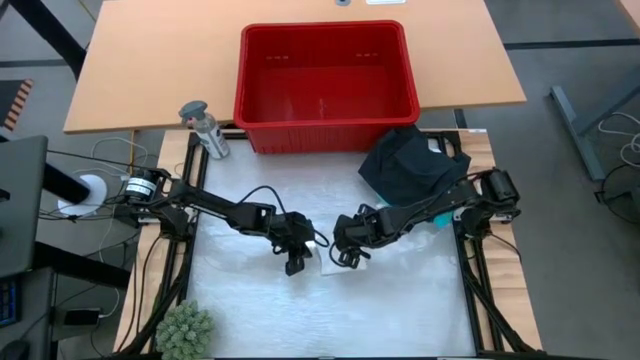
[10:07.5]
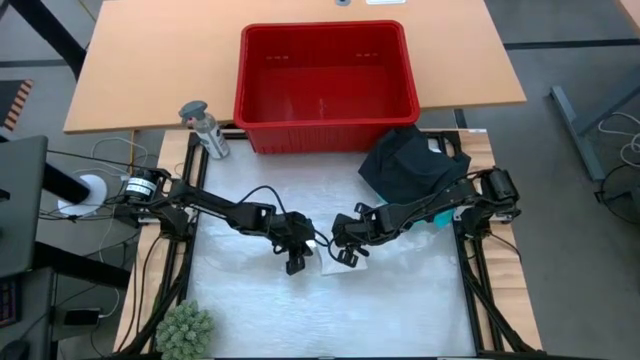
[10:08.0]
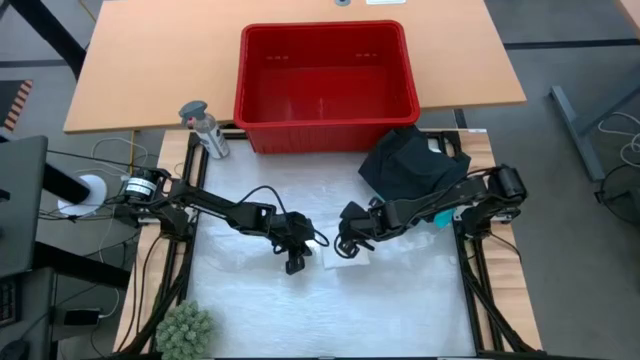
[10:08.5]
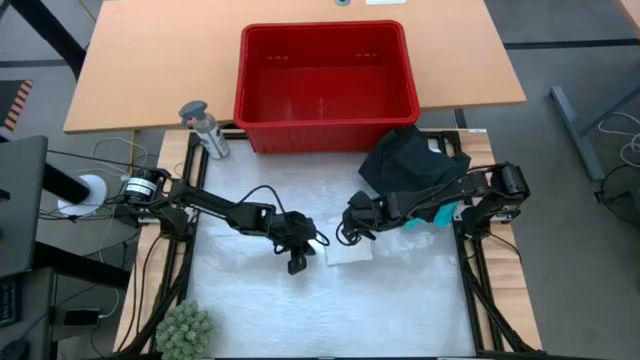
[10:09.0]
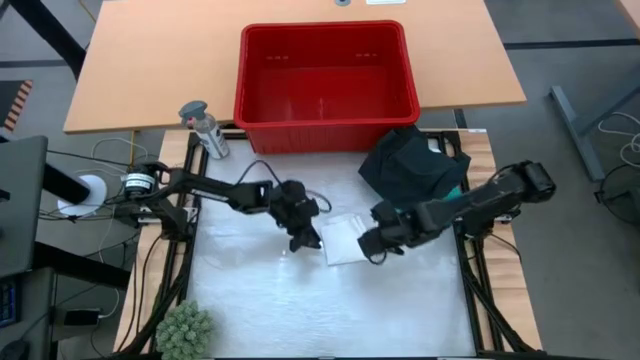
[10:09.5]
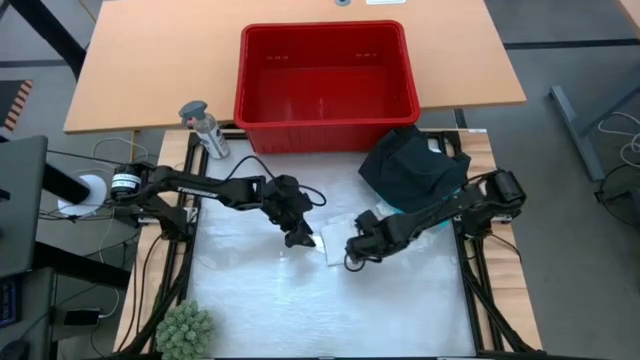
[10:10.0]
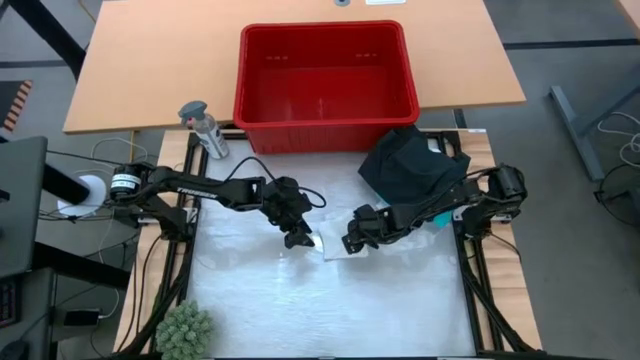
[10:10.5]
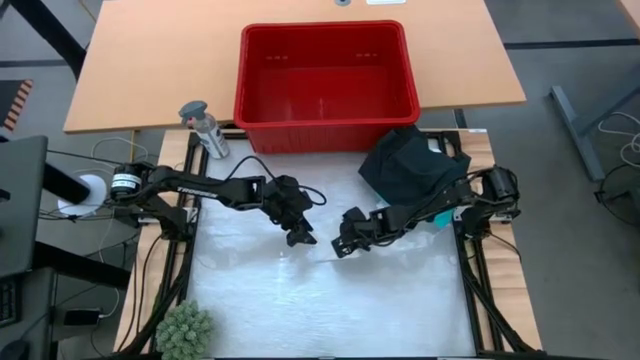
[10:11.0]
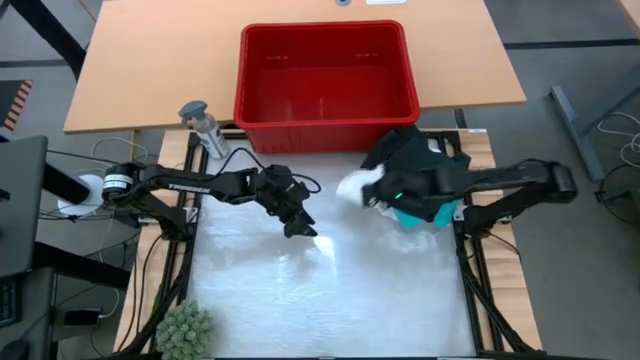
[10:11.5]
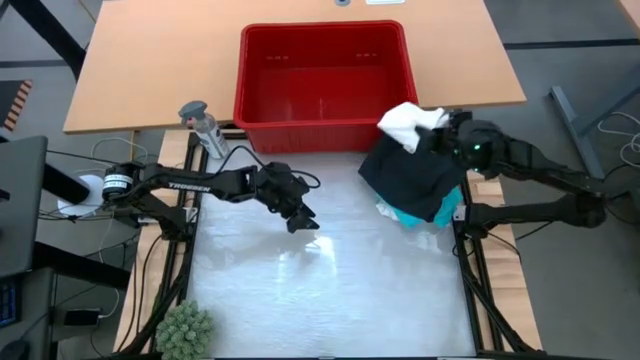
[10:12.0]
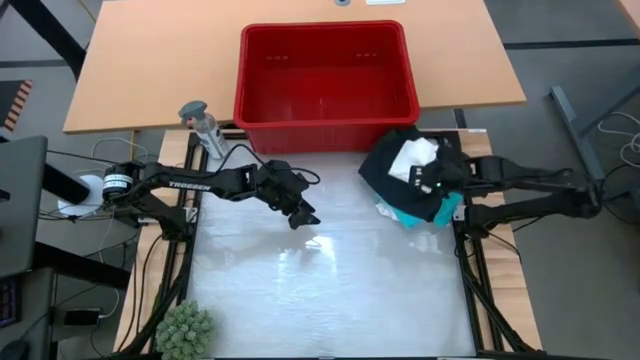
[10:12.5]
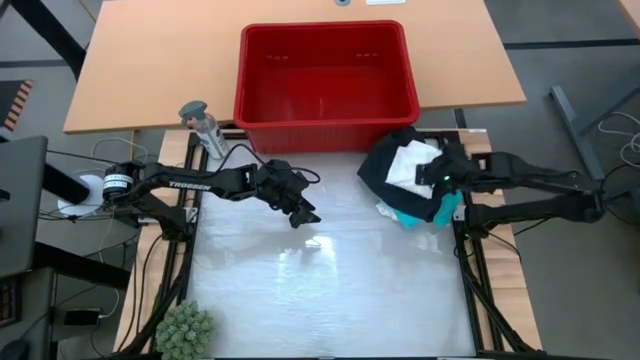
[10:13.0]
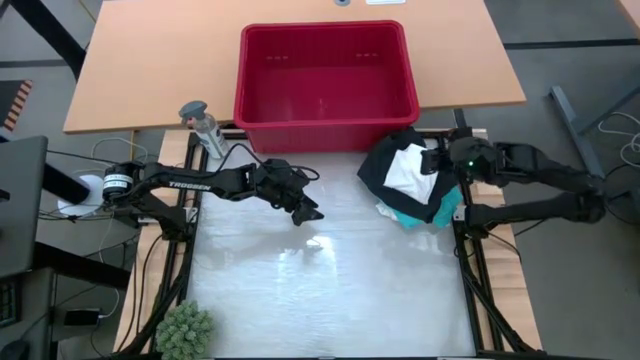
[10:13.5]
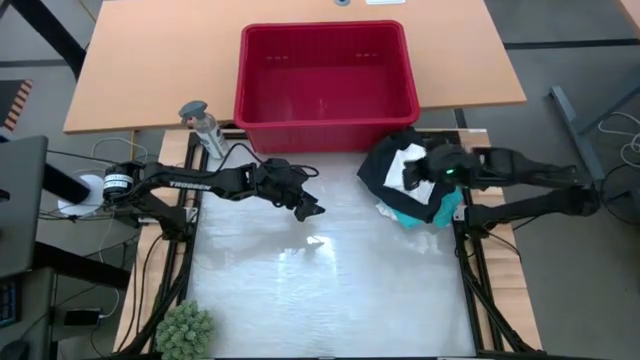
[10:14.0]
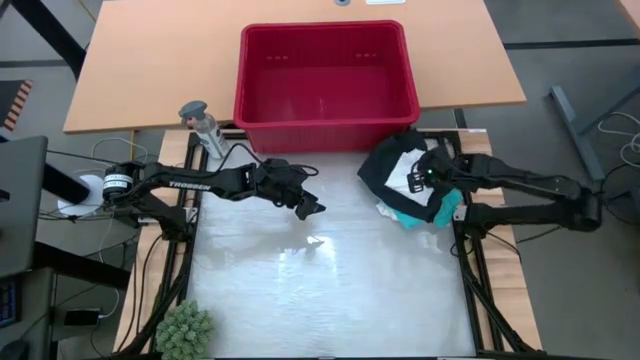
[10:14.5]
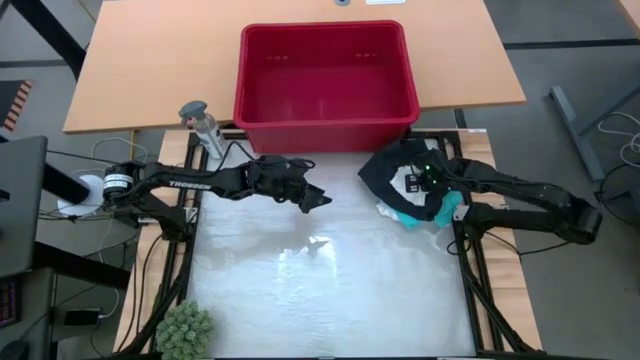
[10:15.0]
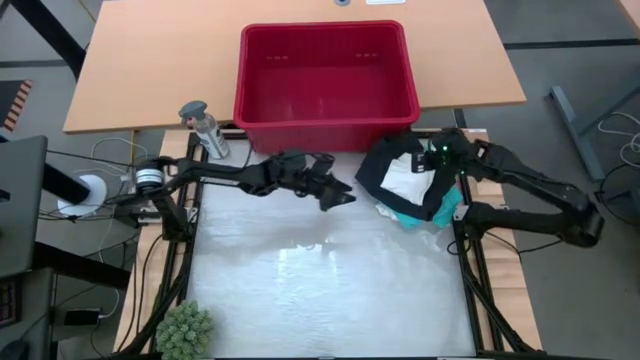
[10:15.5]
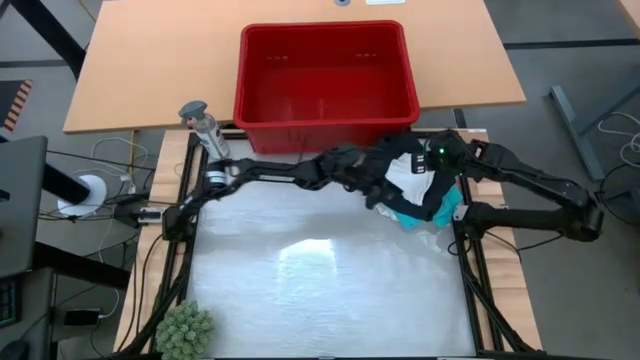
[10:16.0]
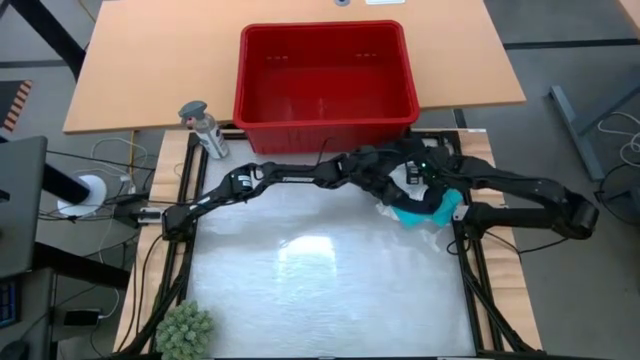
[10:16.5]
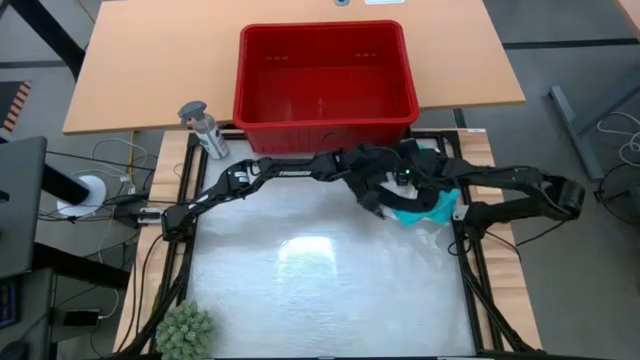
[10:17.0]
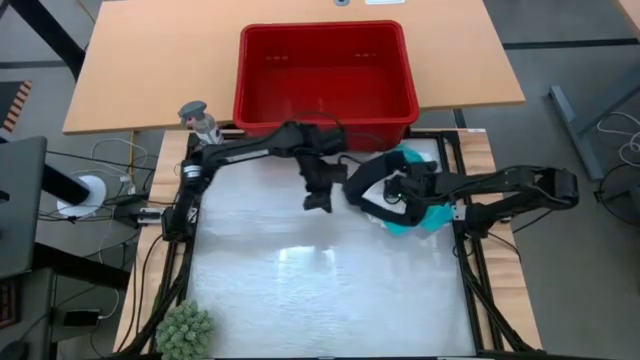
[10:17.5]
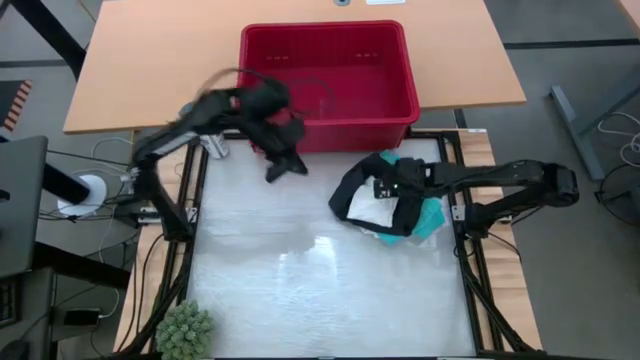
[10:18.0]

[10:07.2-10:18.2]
Task: Fold Laundry from Bin
Stack the white underwear on top of the blue shorts

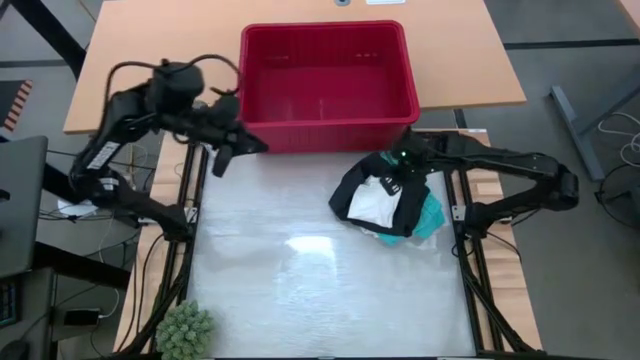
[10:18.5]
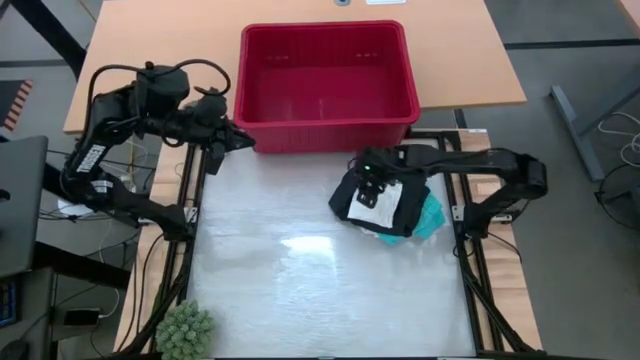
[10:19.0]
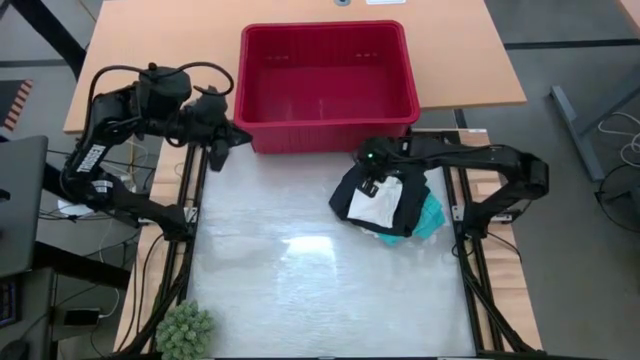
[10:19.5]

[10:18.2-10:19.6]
Put the stacked clothes into the red bin
